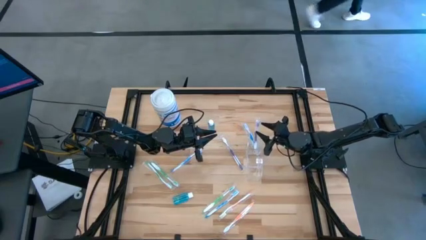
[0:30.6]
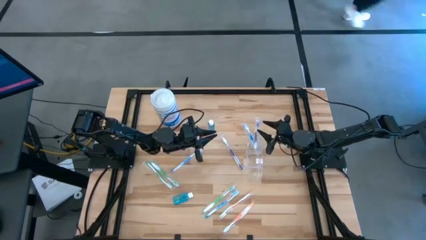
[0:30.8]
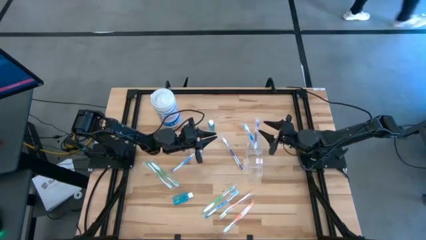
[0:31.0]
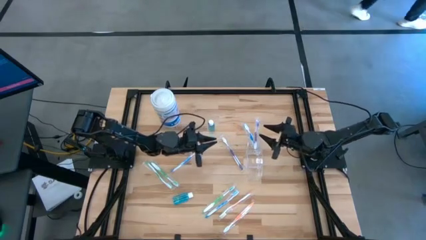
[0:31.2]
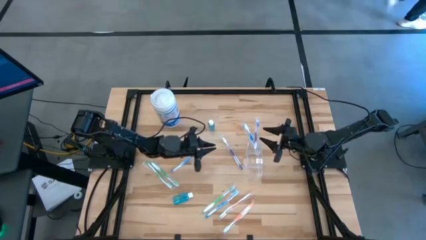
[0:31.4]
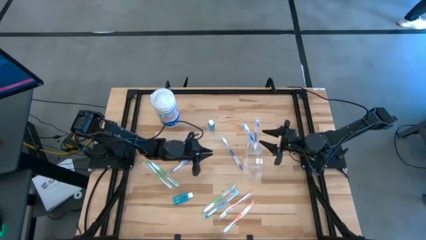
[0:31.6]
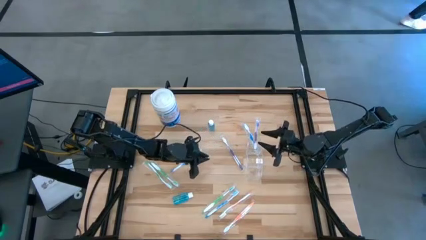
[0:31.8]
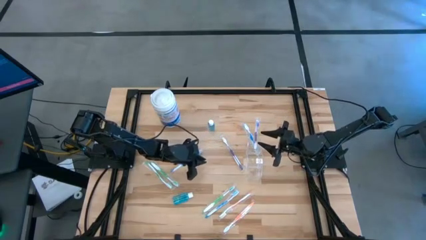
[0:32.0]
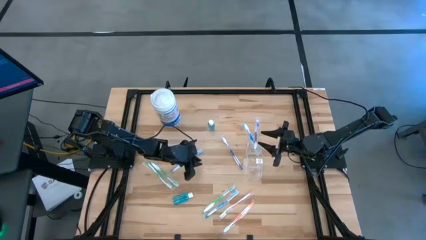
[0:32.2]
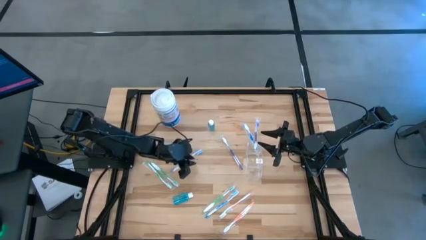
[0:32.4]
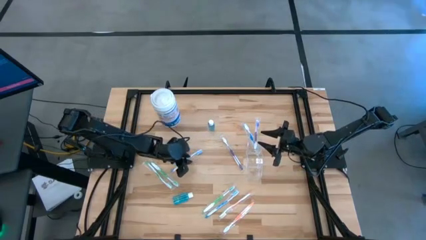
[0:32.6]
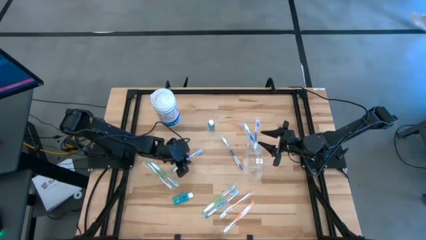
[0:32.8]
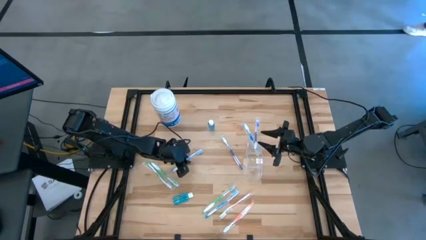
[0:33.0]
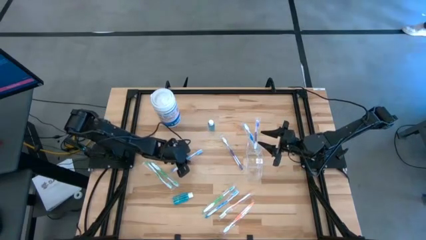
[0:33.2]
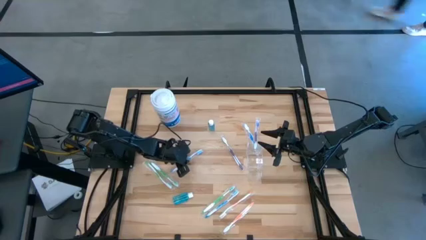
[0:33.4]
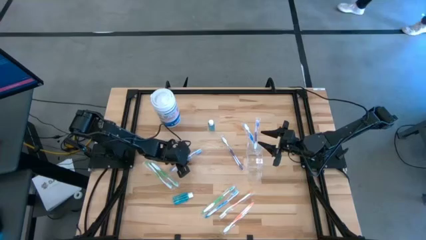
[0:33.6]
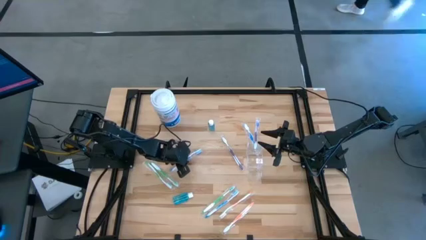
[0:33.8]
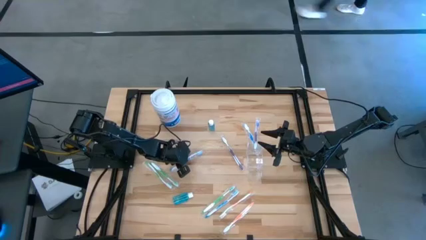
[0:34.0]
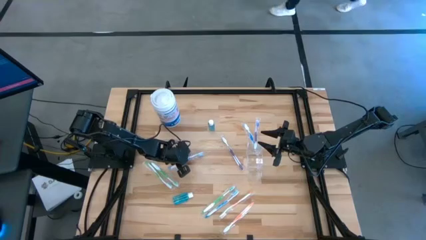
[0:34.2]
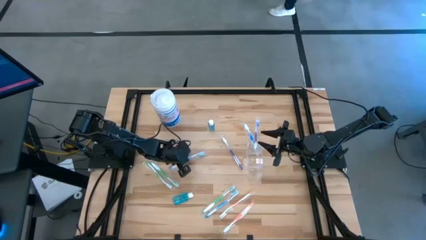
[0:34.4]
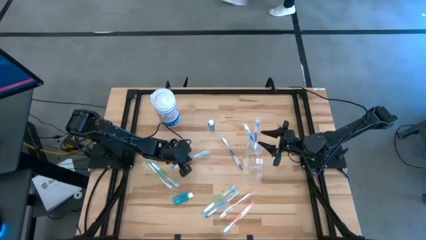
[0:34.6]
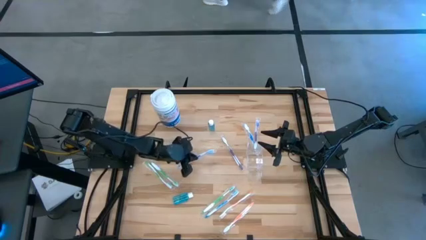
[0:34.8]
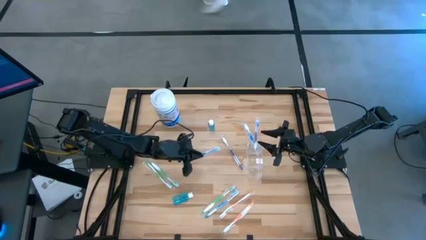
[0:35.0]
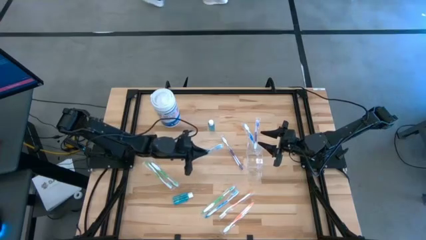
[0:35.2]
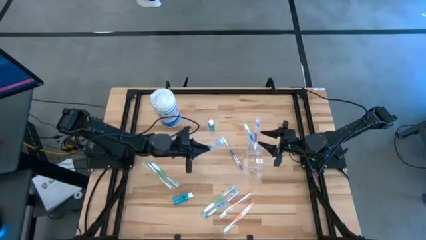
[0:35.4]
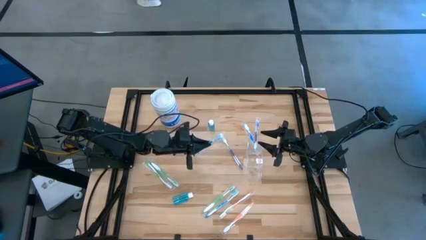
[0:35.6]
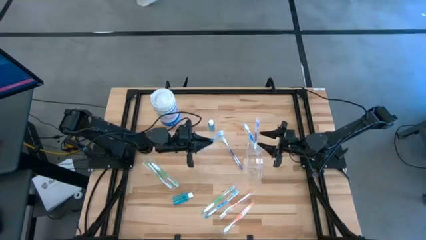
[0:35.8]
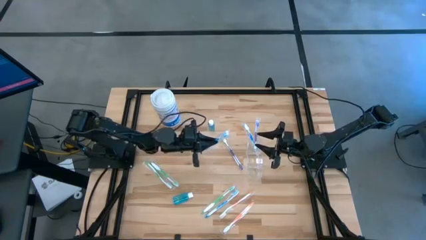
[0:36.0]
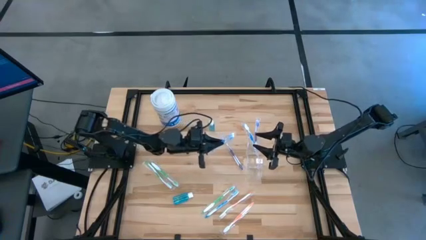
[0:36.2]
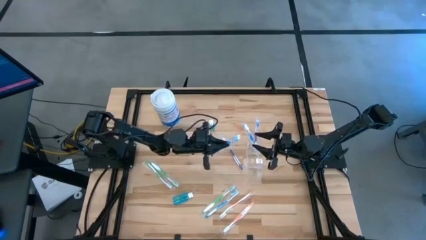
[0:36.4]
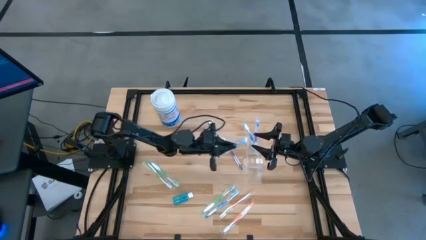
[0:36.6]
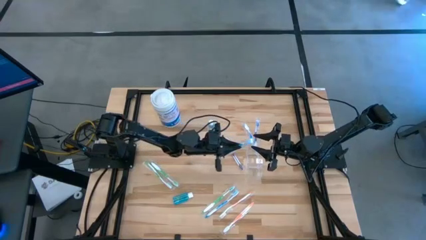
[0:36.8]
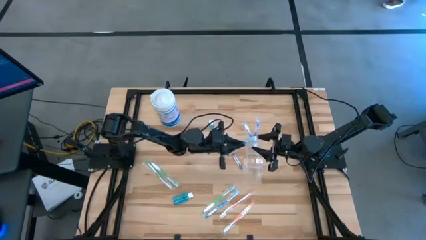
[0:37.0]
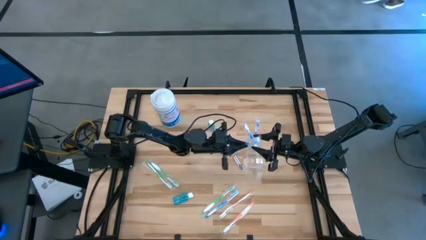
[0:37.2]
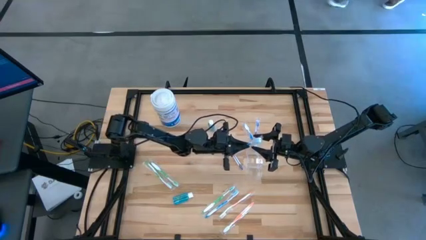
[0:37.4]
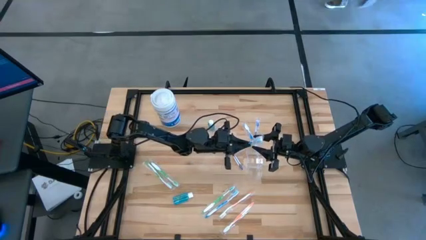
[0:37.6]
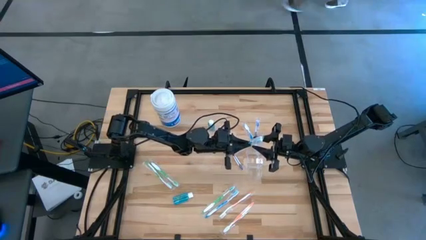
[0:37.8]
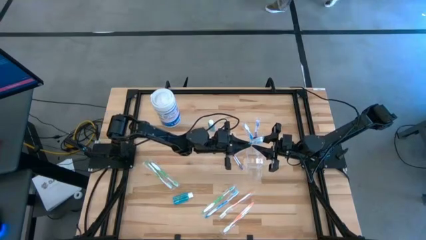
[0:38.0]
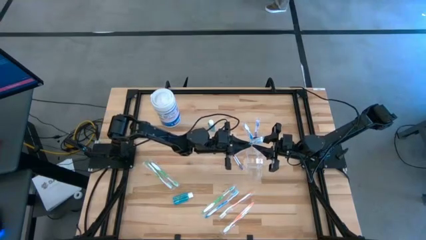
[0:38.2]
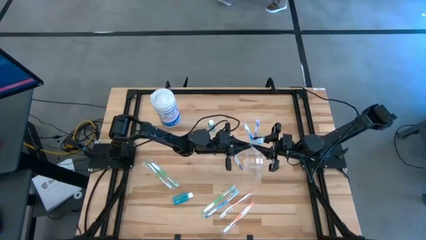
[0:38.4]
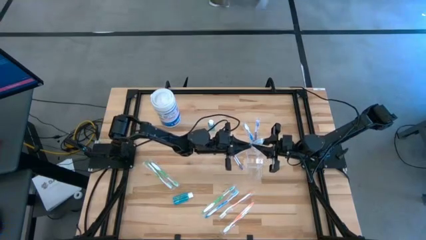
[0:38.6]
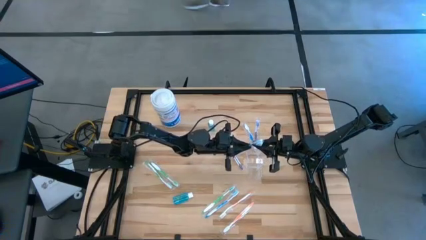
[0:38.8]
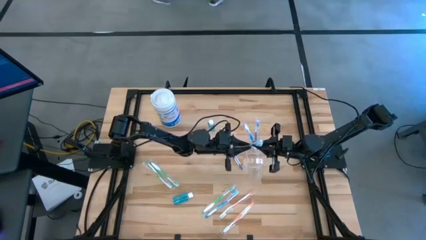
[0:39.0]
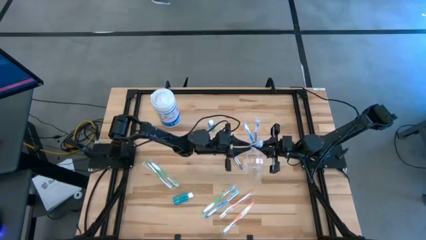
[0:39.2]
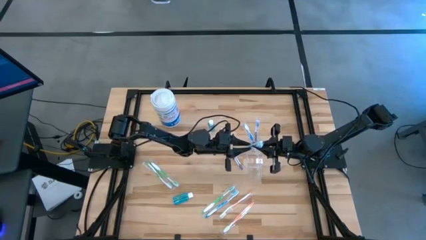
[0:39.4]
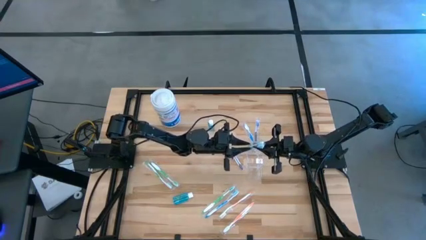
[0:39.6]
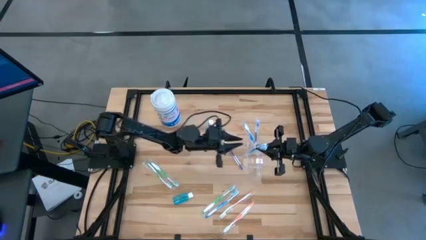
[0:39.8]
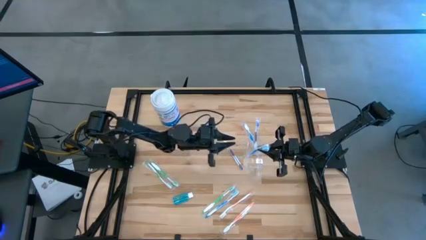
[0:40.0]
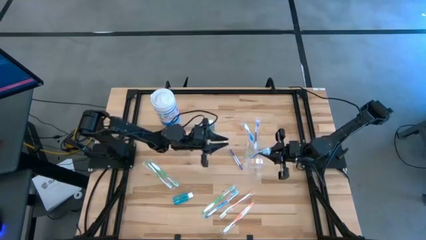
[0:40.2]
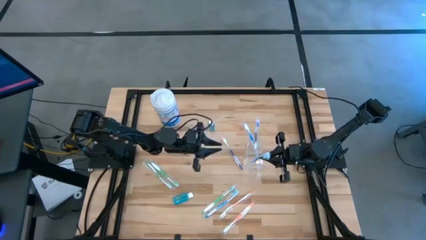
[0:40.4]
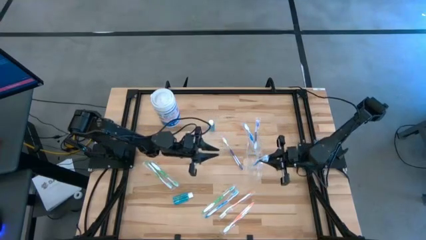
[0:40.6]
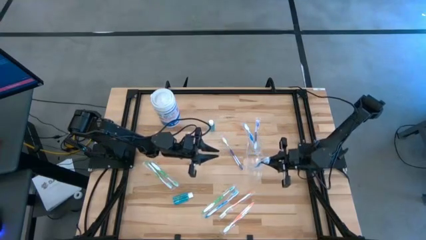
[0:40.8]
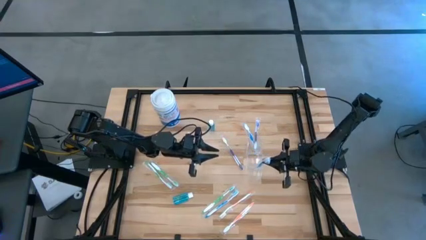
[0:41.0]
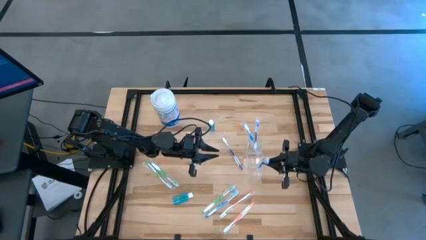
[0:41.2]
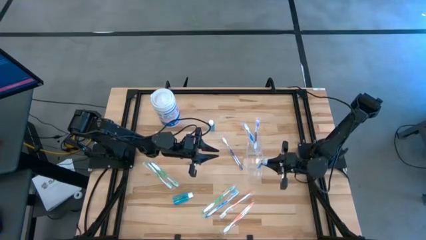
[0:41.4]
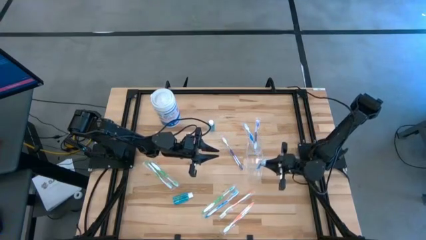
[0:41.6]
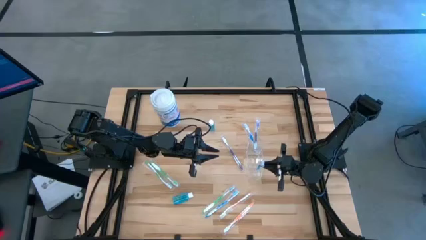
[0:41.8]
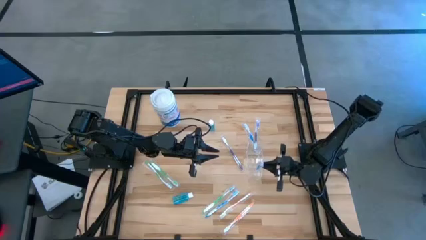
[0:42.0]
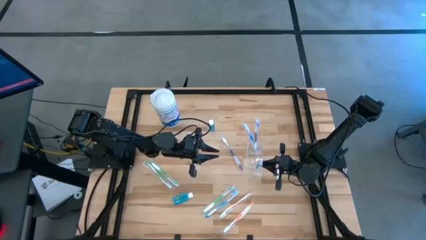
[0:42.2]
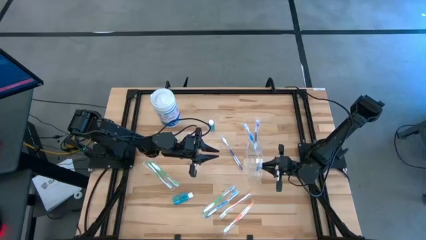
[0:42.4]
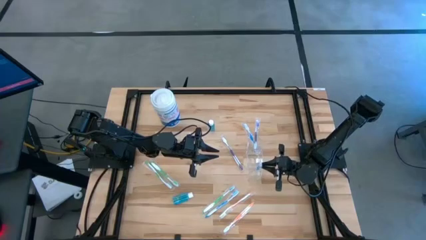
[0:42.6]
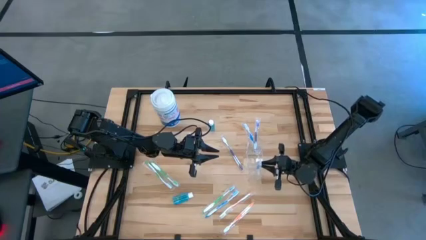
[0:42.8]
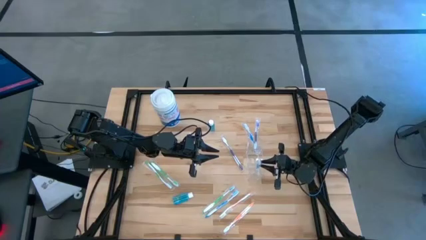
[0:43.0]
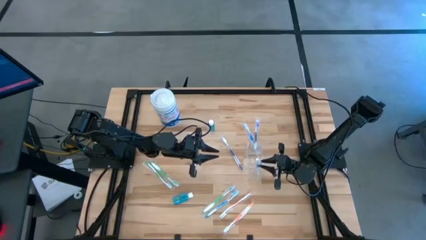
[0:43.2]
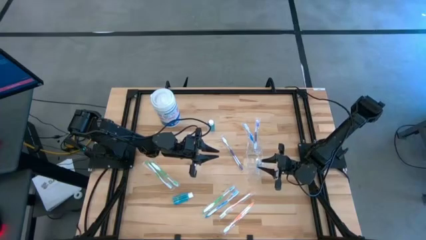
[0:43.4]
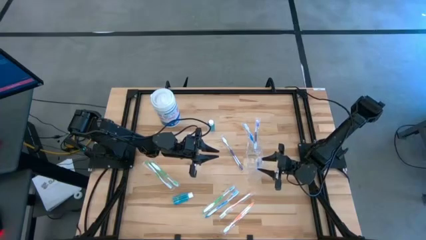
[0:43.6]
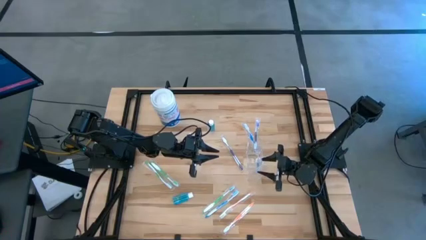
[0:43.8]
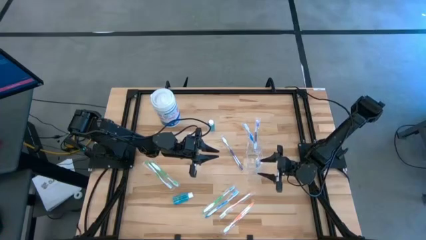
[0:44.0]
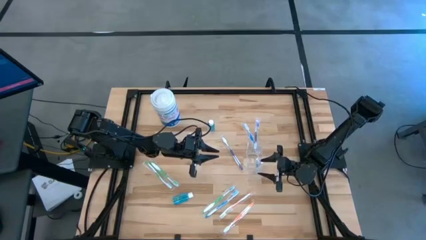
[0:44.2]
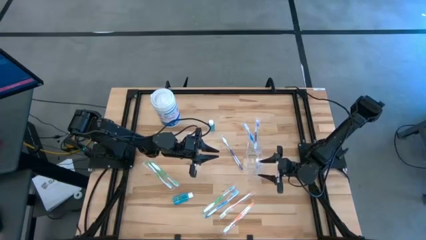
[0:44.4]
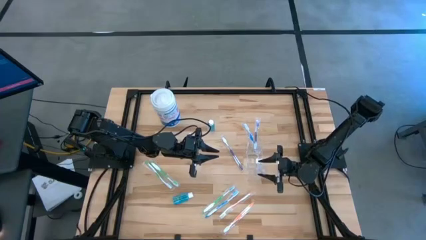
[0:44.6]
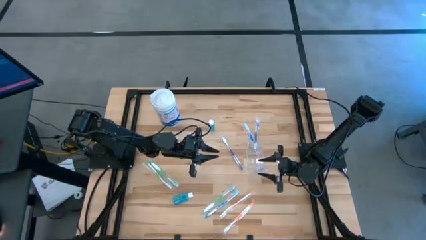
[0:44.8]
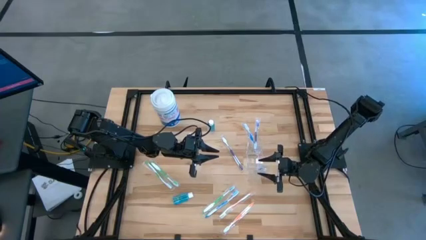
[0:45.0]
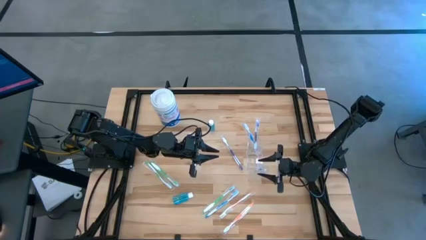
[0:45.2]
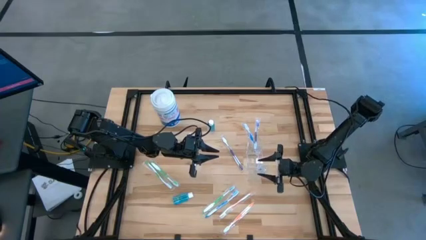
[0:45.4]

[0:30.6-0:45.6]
Task: Pick & Place toothbrushing station
Put the blue toothbrush into the transparent organizer

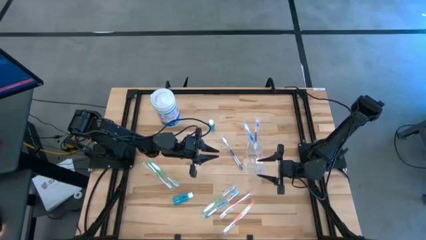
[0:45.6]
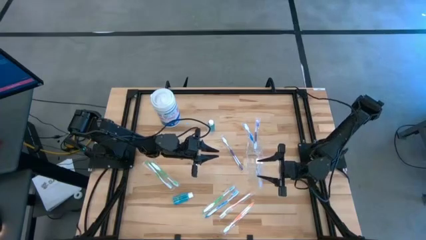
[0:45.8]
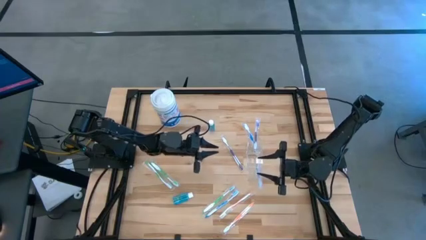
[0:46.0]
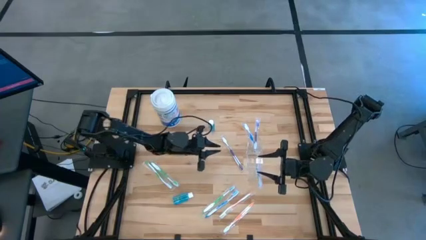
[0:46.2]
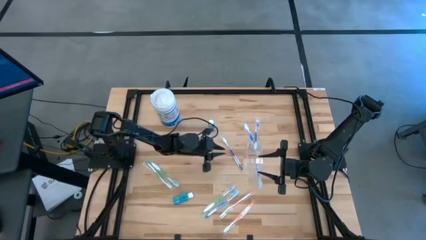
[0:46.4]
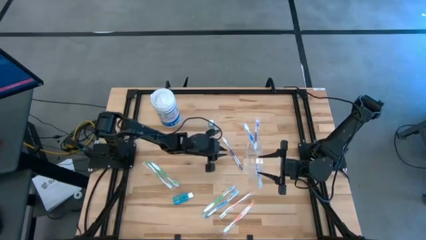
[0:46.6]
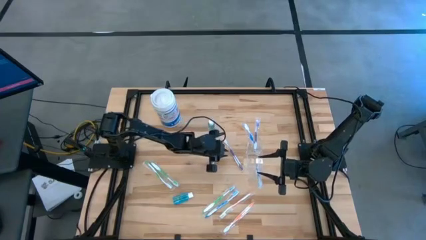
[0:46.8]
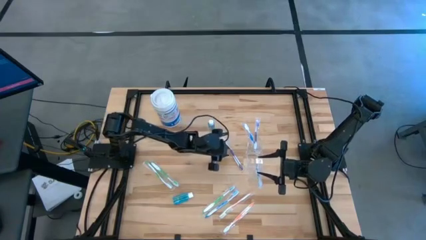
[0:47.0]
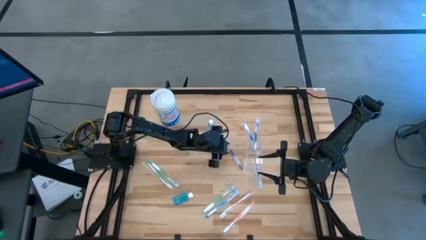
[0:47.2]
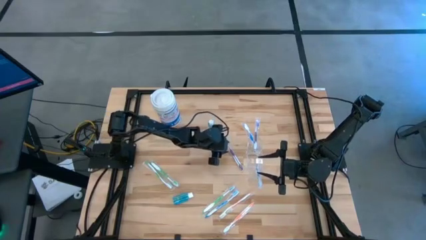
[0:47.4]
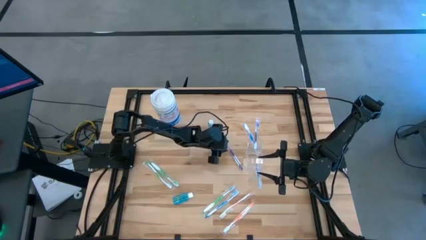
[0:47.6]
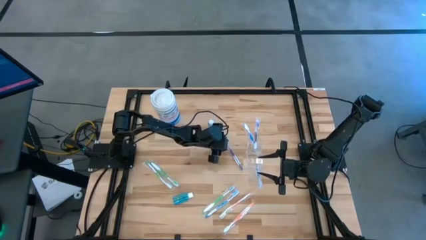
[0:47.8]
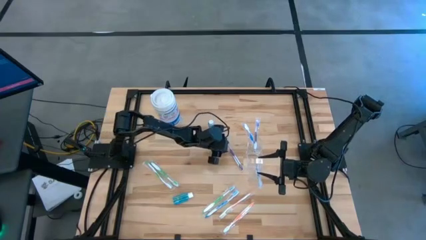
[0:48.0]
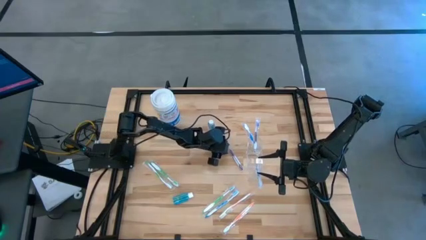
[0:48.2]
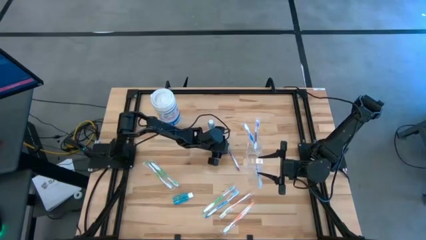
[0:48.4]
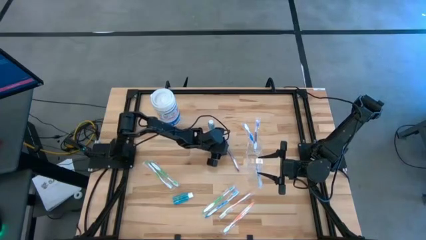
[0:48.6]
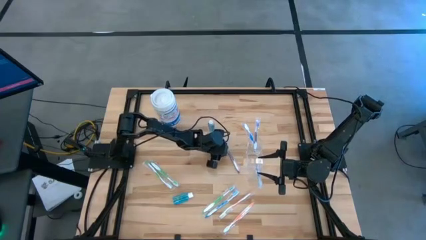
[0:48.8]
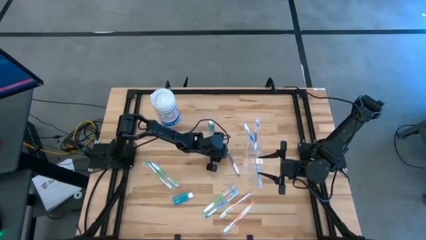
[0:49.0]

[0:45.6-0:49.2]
Put the purple toothbrush into the transparent organizer
